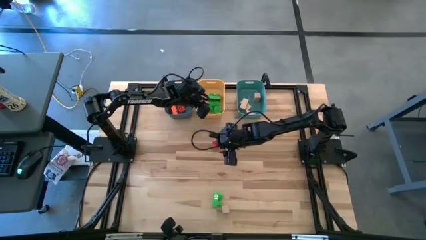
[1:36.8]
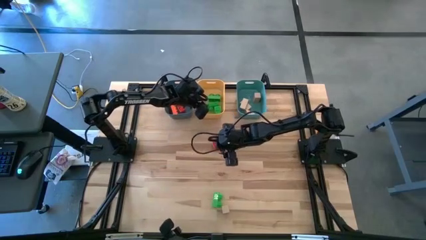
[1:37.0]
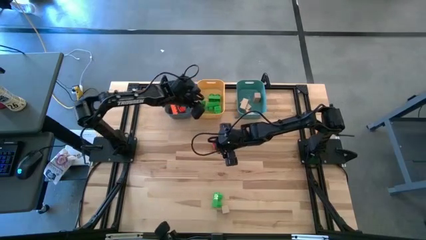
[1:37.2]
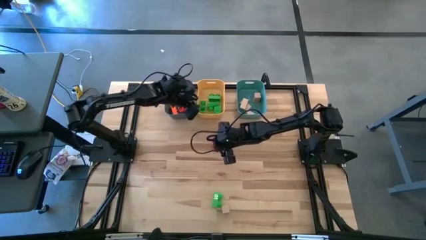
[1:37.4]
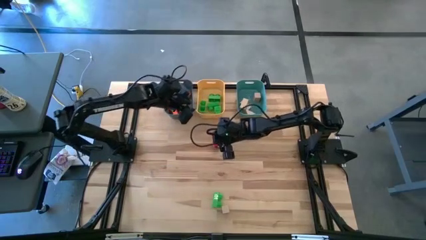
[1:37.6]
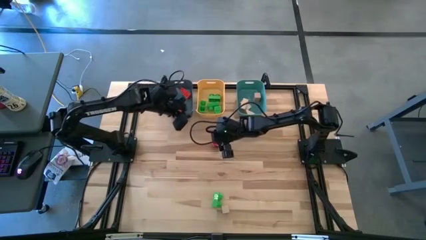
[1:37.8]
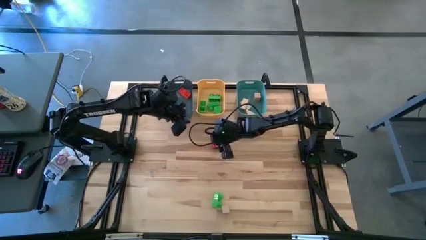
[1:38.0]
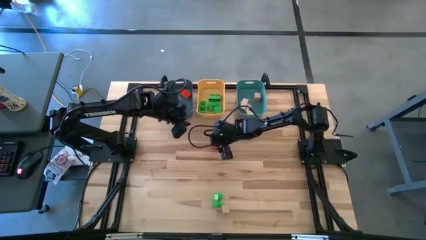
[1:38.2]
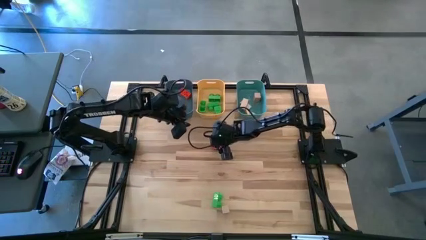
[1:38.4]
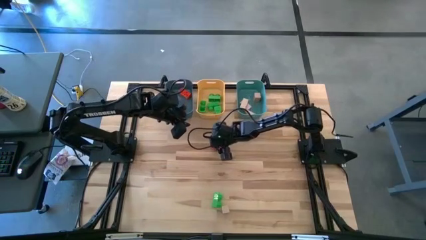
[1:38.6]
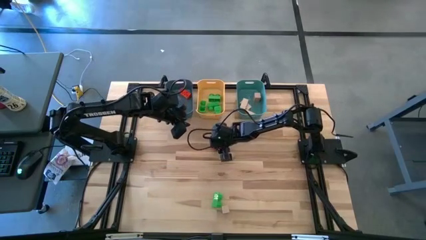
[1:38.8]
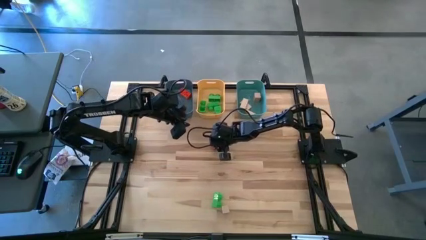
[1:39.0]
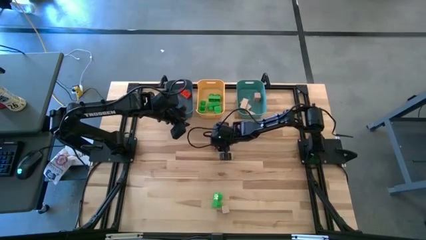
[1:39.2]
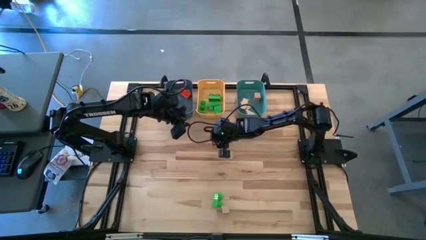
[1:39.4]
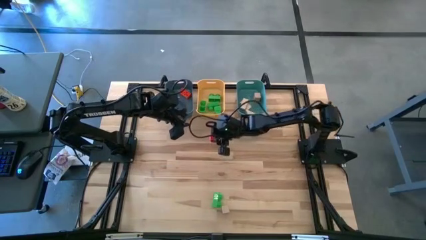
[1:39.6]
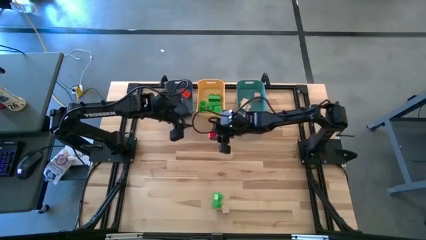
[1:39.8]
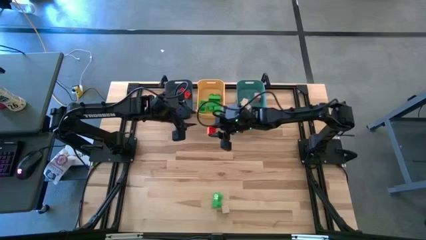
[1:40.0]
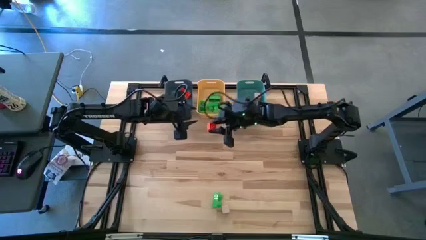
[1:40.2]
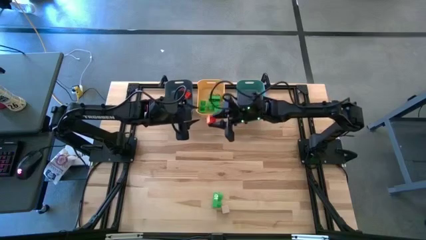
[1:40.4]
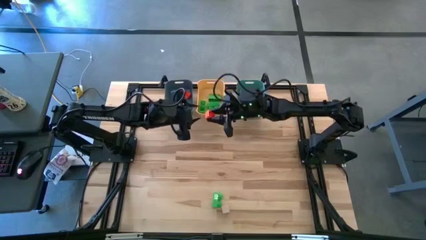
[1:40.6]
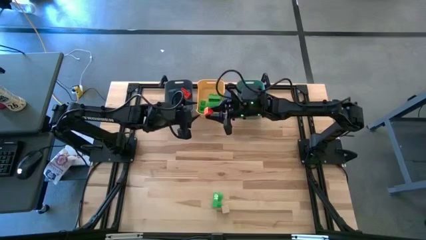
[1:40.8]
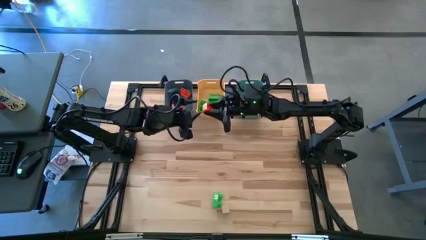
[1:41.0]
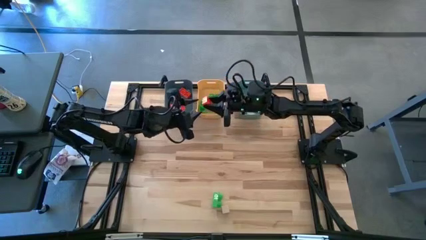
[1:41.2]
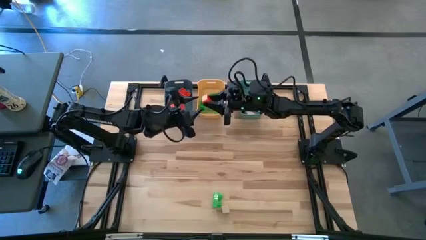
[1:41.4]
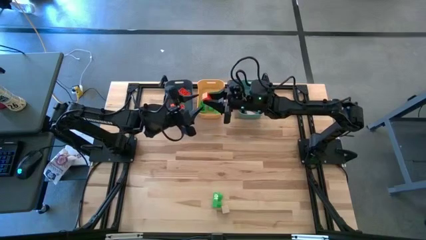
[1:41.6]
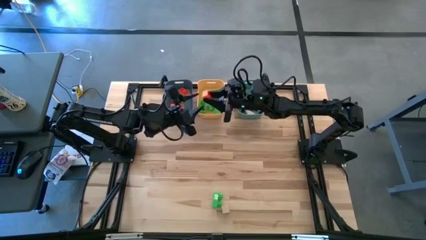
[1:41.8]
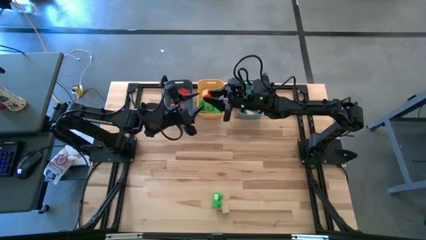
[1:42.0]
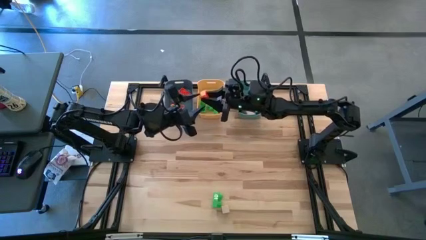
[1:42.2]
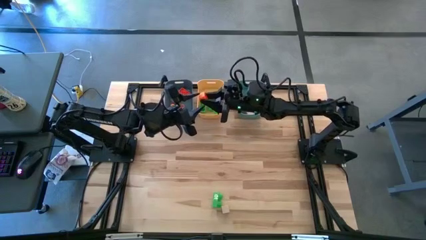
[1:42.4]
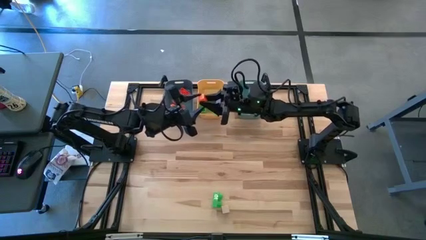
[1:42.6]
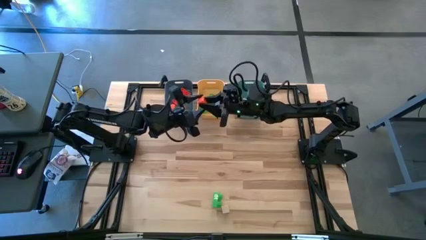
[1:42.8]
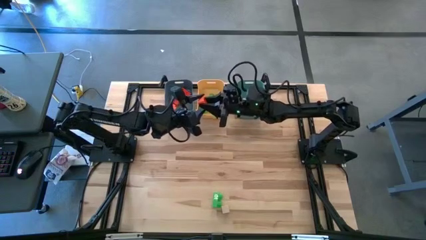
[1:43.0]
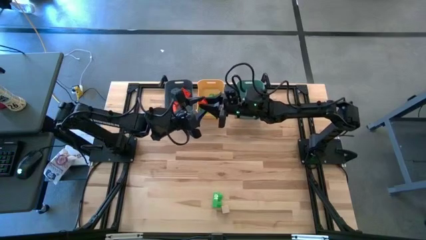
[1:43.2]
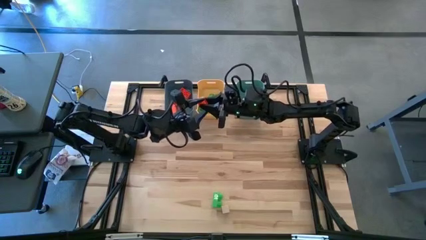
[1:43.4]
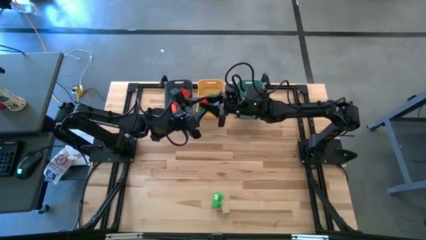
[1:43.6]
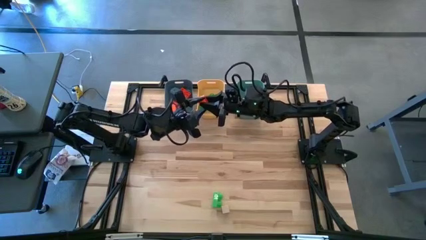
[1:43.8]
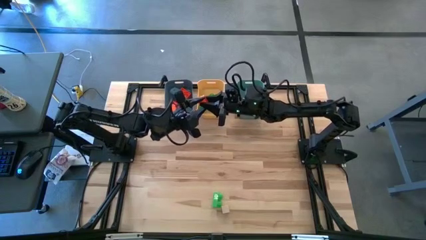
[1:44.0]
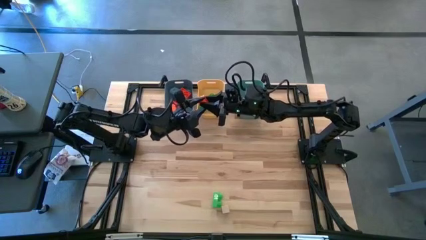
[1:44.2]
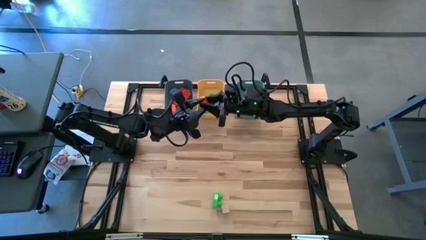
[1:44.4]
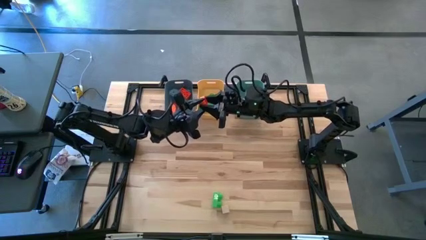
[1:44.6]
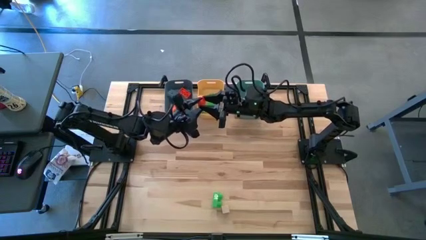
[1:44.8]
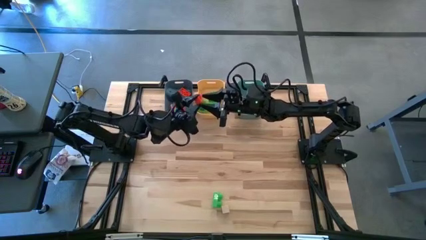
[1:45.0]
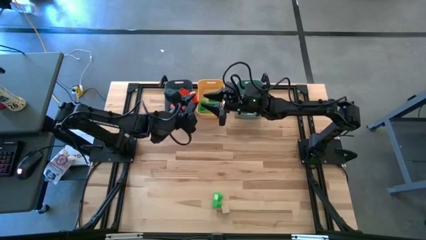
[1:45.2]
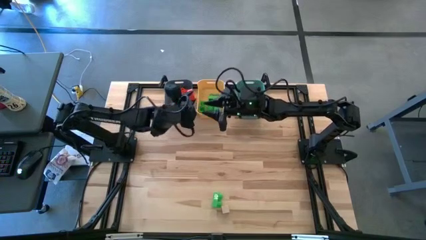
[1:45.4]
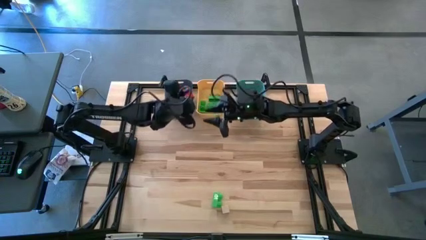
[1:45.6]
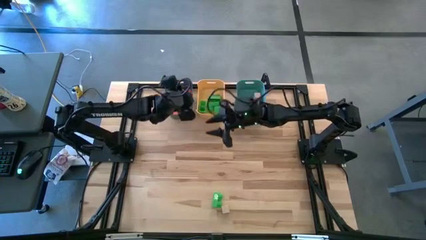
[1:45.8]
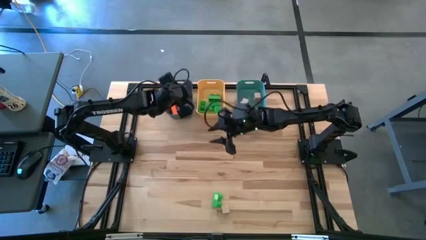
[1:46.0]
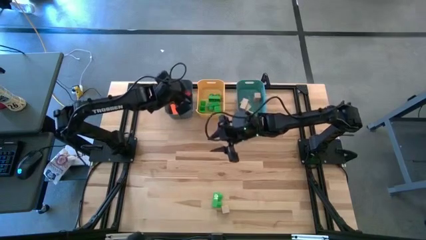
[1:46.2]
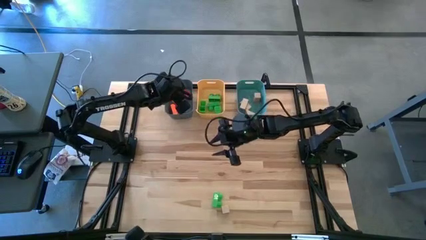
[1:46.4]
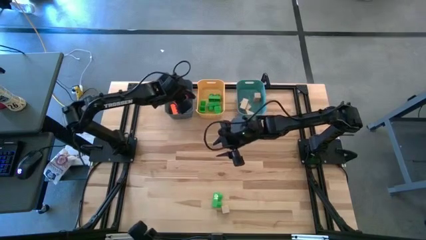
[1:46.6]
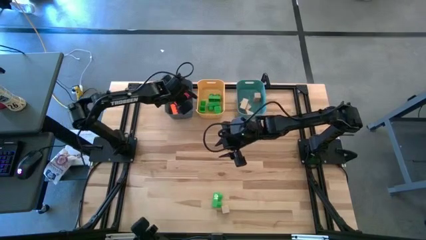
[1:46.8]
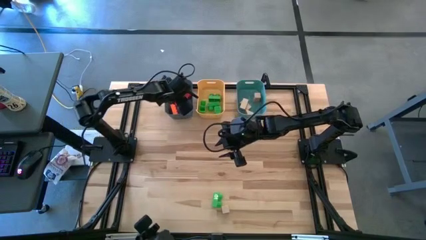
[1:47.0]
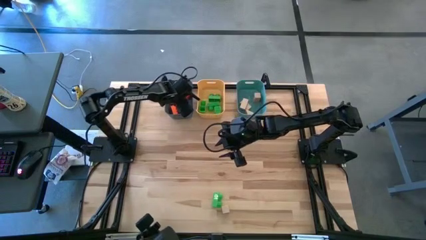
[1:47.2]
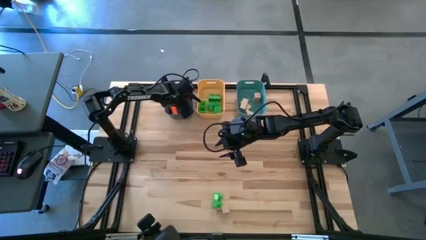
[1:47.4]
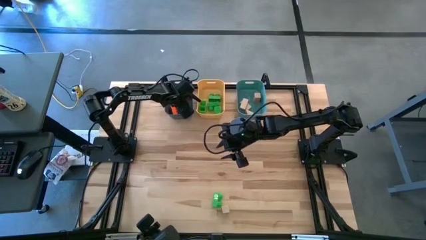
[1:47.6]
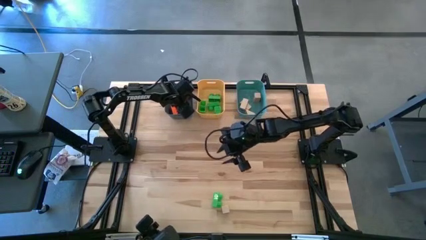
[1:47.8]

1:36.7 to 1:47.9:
Task: Sort & place blocks by color
Put the orange game piece into the blue bin

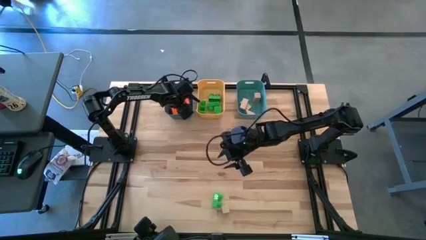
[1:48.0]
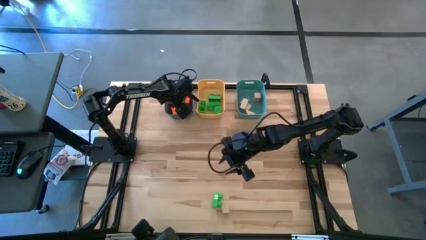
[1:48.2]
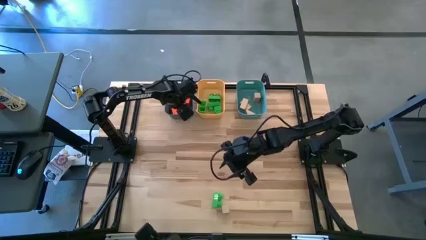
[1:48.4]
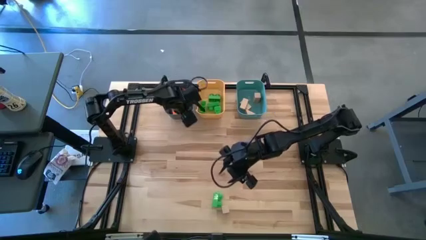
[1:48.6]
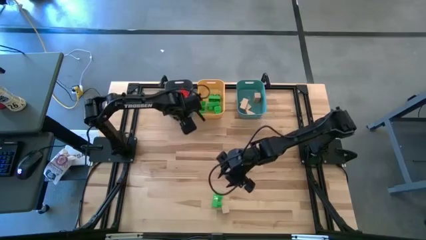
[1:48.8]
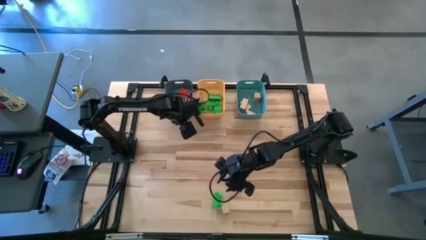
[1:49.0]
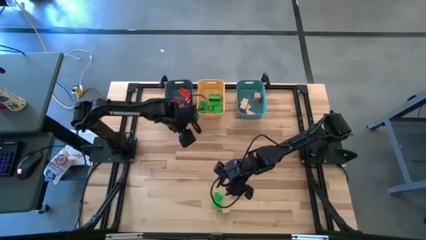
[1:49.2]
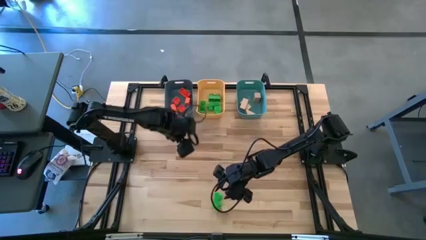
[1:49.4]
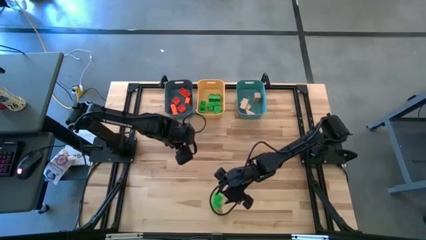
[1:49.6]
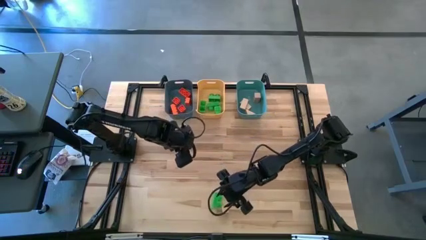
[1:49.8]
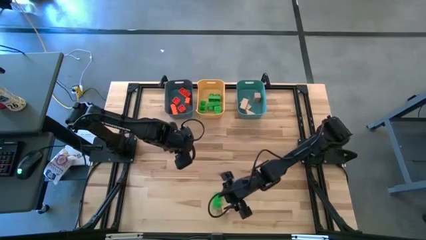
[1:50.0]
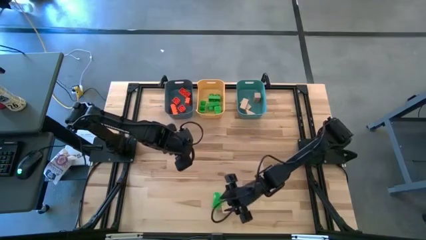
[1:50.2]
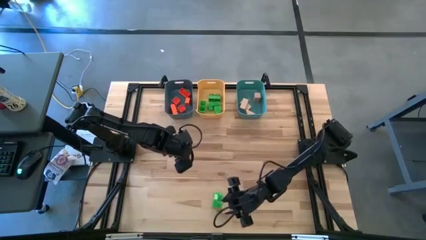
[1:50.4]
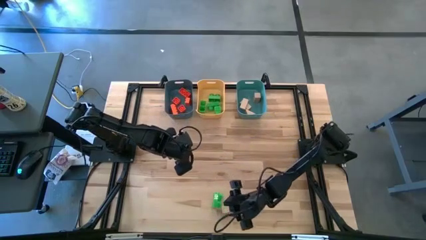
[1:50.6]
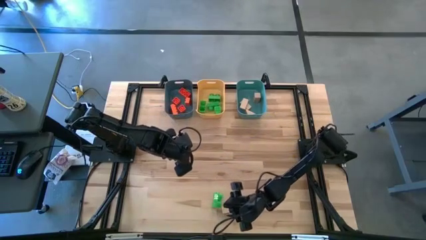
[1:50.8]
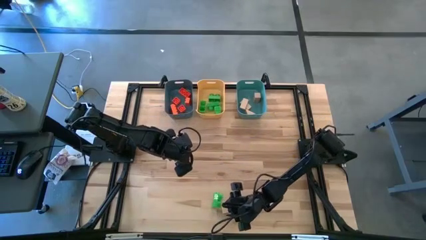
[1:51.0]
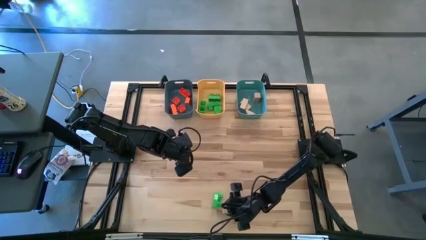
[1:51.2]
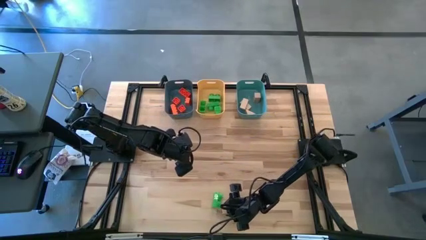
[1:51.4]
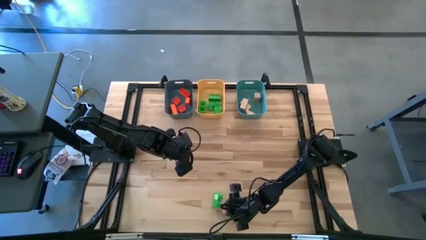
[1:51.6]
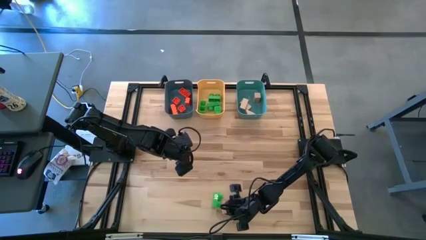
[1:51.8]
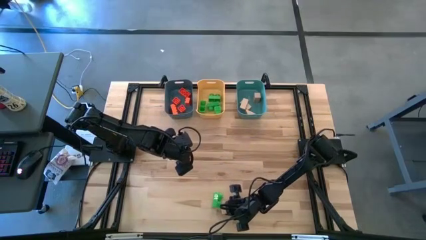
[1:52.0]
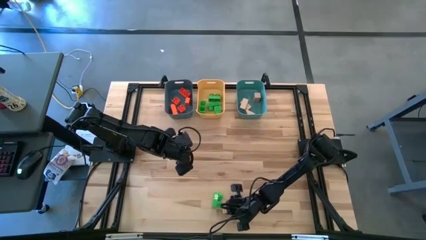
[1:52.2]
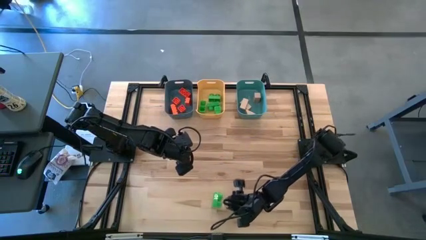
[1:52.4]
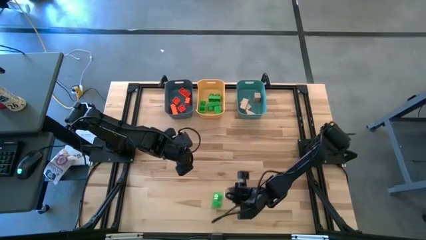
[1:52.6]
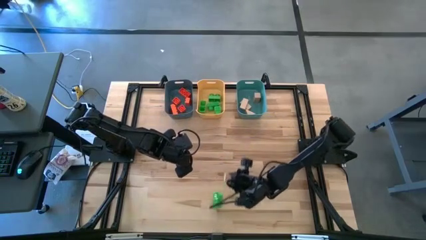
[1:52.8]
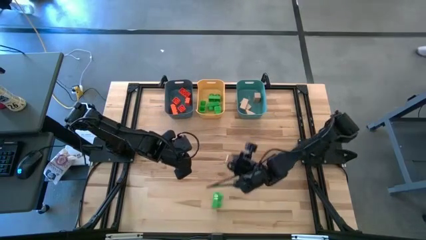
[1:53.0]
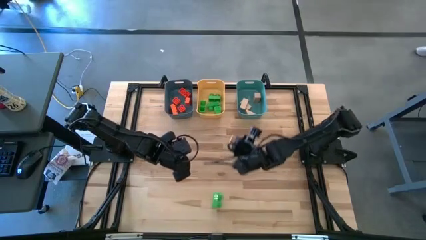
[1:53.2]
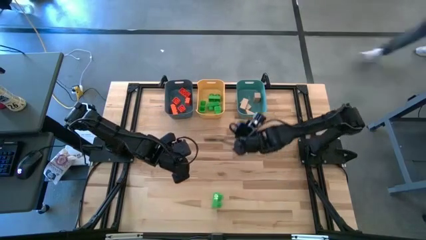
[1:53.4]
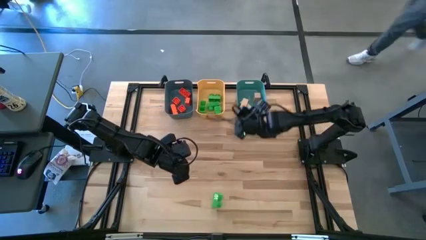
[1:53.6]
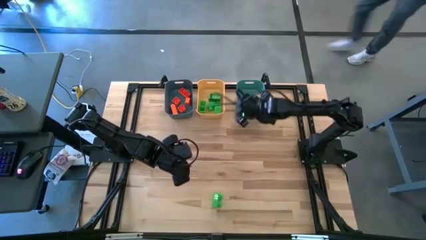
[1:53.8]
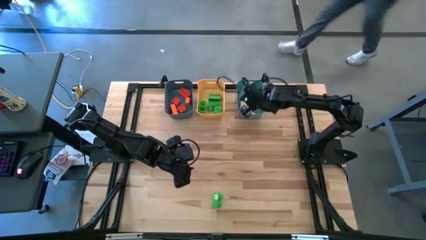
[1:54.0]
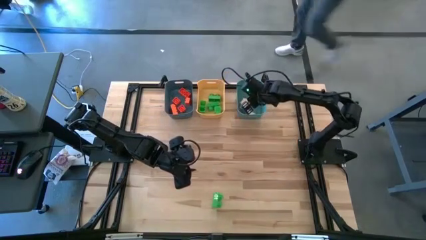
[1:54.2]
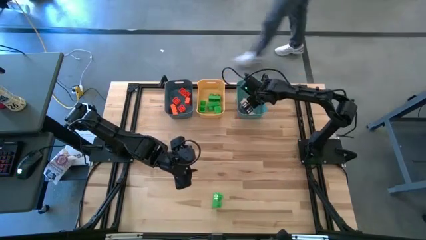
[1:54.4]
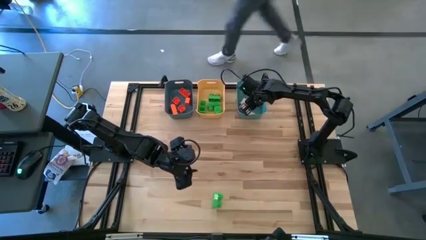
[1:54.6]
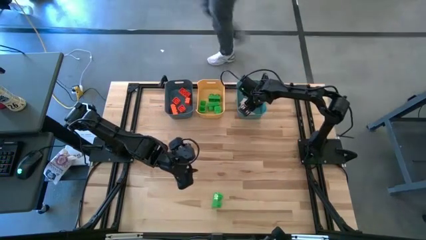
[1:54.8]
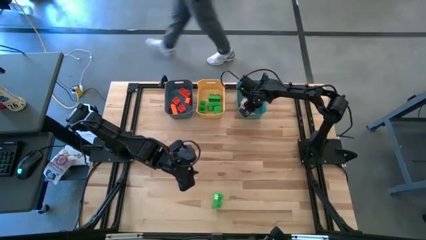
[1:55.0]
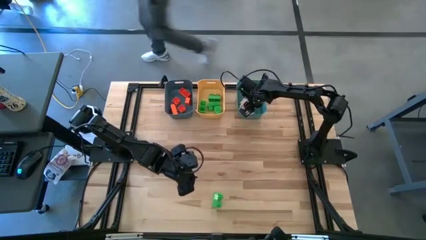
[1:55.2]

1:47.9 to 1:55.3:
Put the brown block into the green bin
